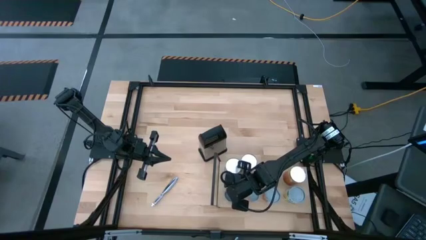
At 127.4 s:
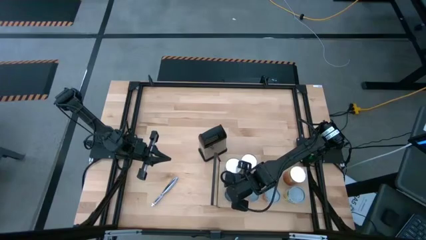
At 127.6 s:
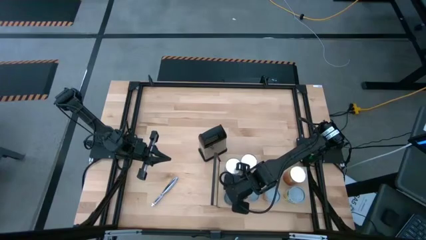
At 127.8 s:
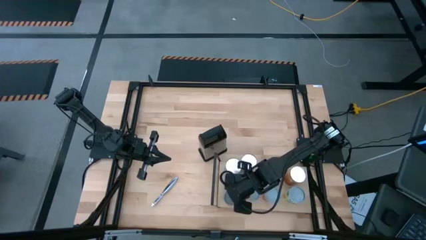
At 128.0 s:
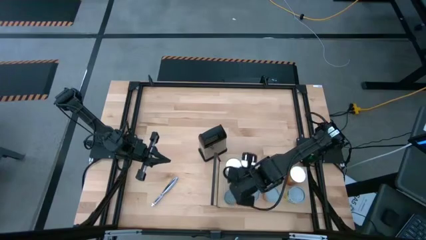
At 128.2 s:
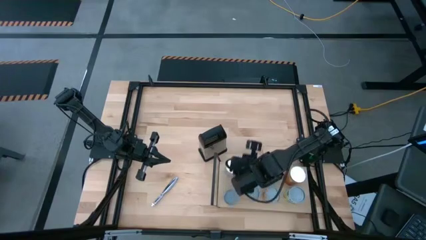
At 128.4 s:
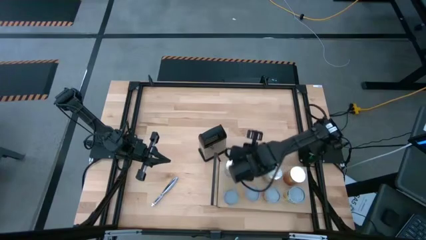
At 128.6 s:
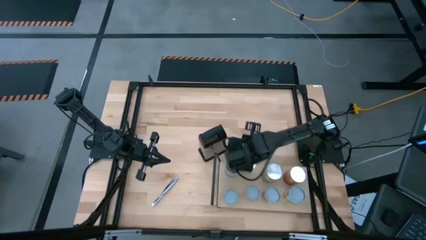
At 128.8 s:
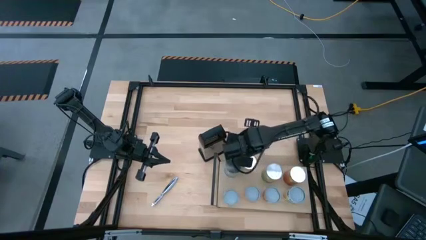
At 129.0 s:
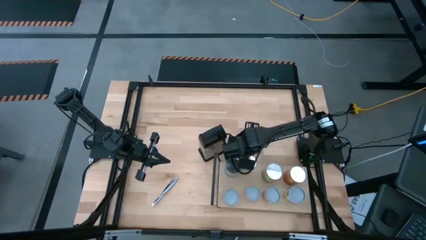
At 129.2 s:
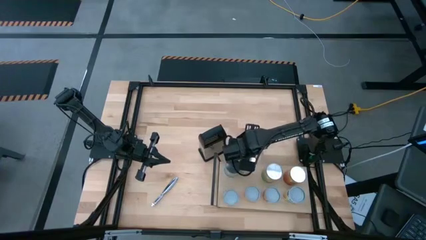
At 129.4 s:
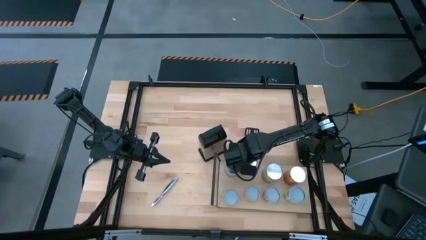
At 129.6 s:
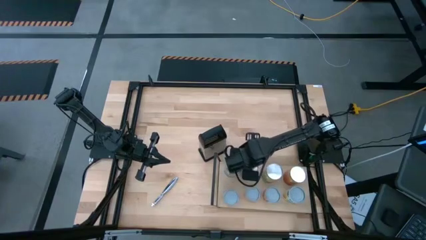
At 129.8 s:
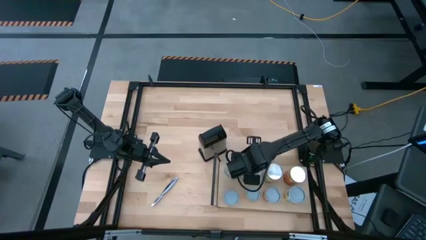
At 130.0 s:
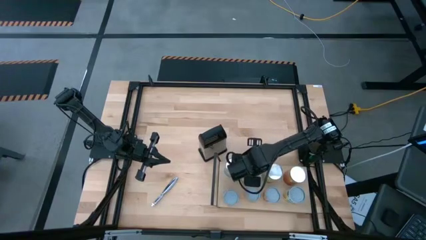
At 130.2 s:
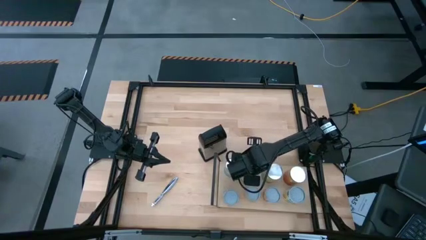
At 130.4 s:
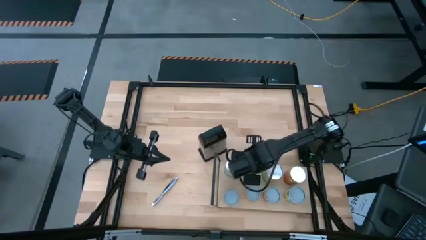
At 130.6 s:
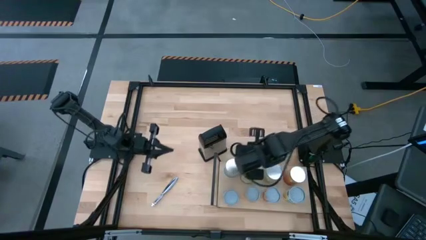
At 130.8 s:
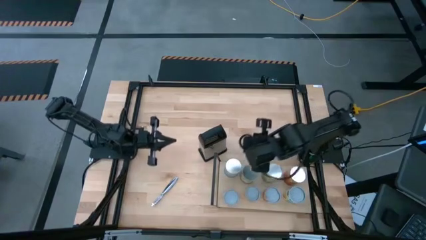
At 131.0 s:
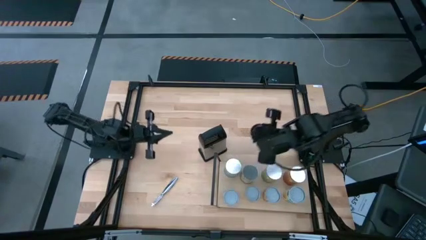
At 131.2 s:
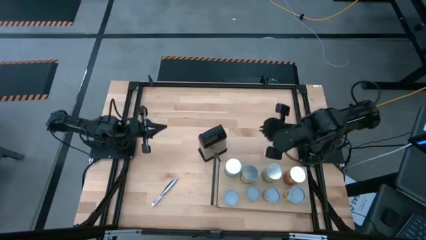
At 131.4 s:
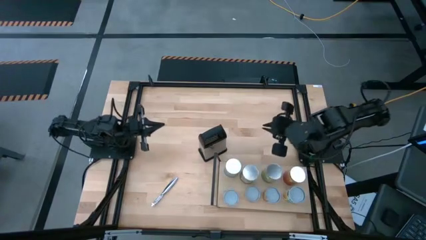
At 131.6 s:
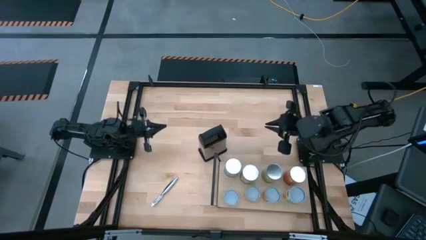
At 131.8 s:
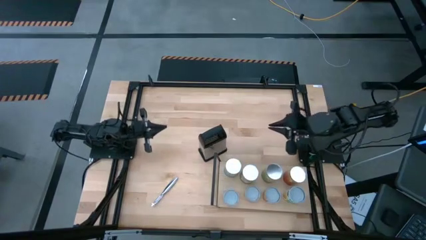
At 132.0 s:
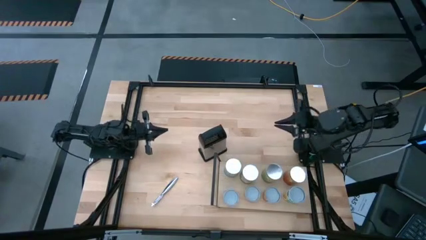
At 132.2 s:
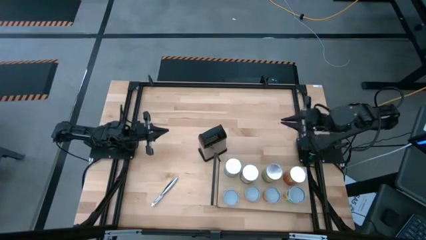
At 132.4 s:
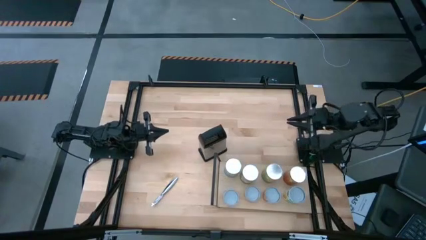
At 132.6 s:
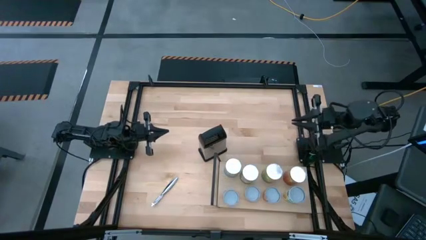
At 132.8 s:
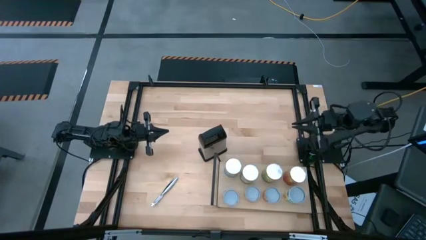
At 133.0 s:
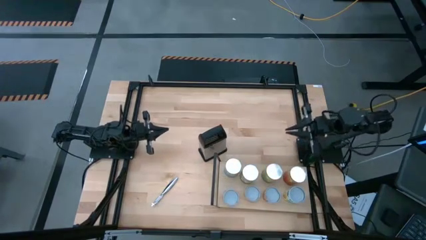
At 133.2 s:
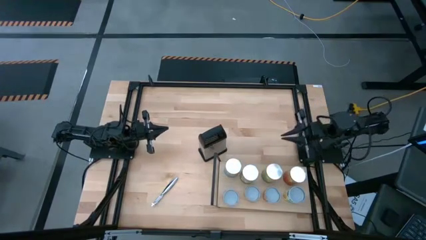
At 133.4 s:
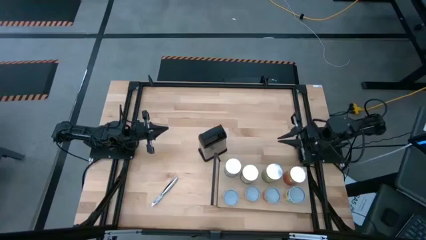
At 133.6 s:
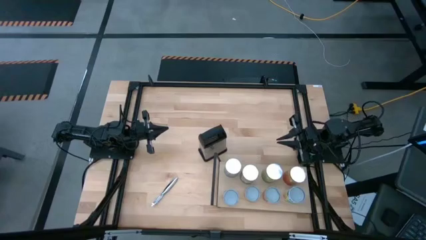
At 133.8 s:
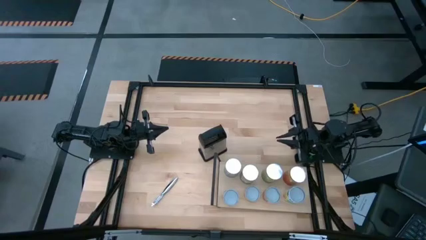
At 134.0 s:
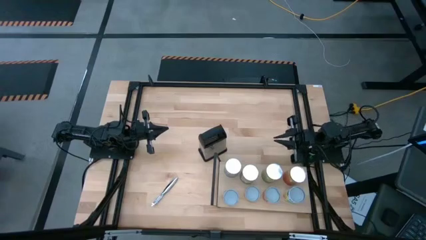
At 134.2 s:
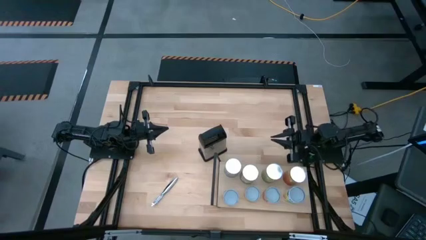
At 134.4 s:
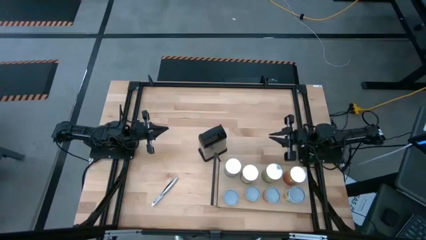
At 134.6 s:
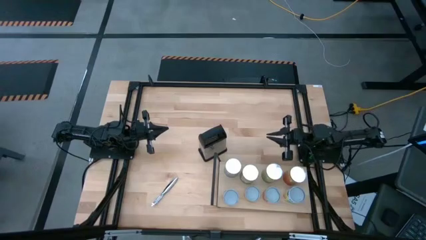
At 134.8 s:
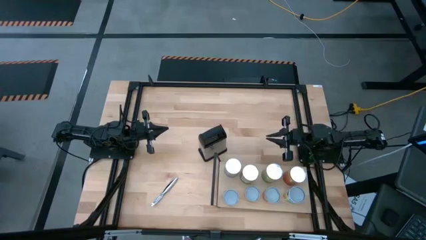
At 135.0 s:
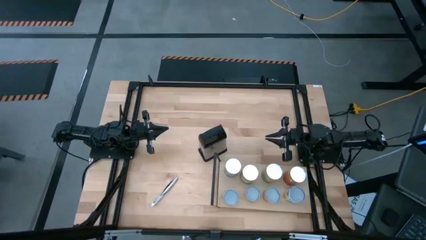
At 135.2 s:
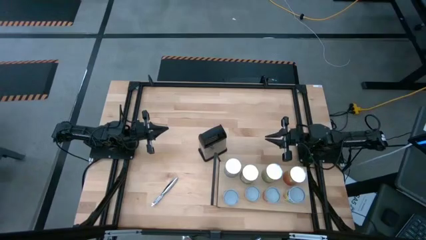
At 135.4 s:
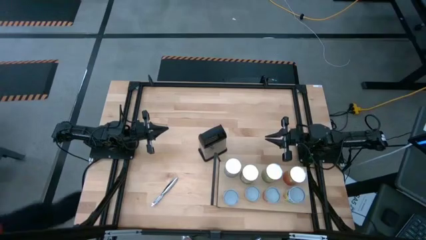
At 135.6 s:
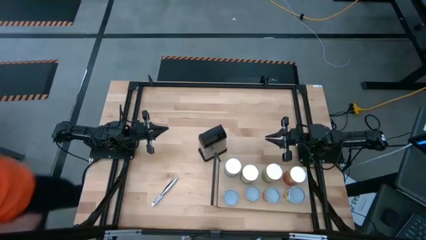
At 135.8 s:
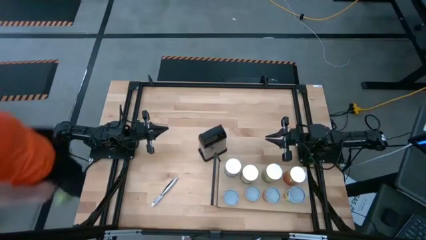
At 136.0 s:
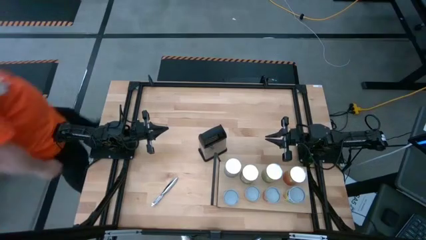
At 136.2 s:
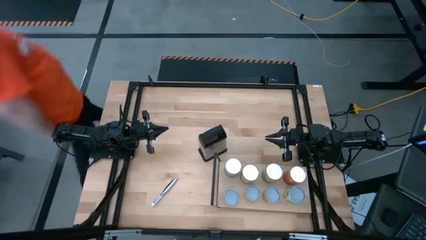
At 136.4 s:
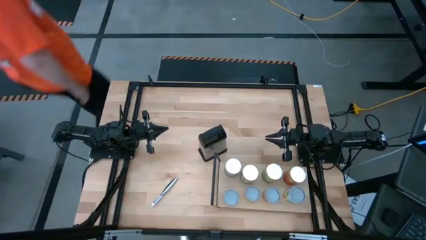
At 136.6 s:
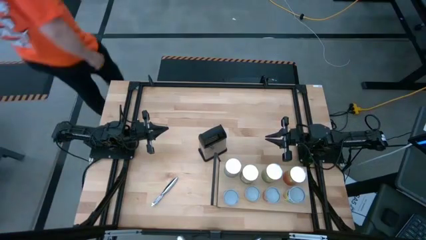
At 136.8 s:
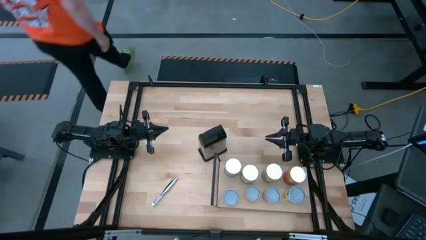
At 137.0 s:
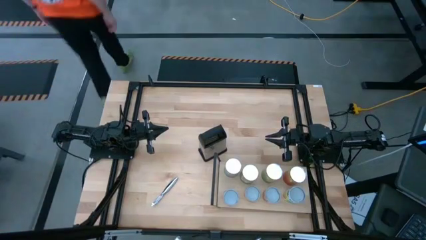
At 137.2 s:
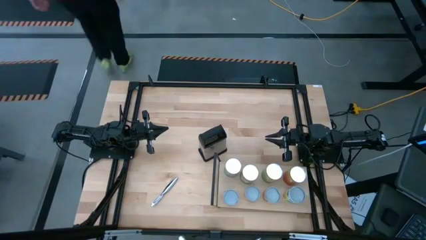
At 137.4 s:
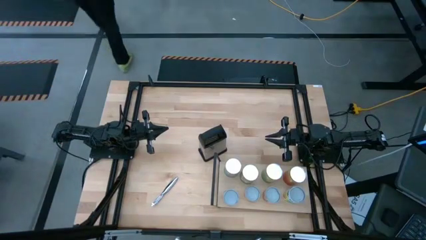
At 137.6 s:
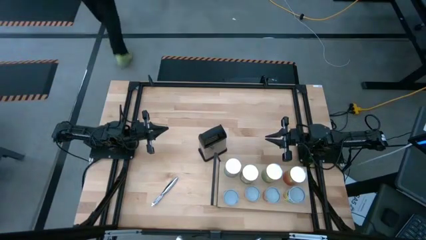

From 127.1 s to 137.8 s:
Task: Pick and place cans onto a shelf
Return to Home Position

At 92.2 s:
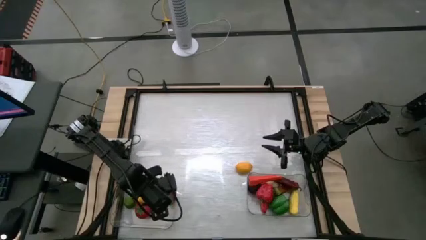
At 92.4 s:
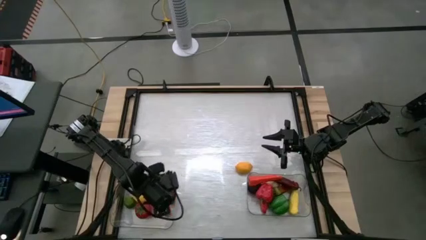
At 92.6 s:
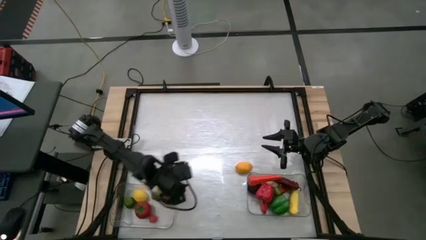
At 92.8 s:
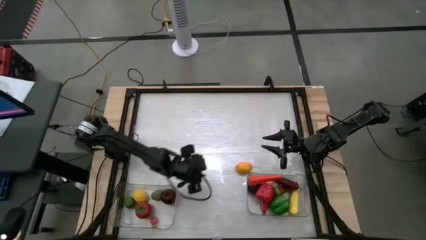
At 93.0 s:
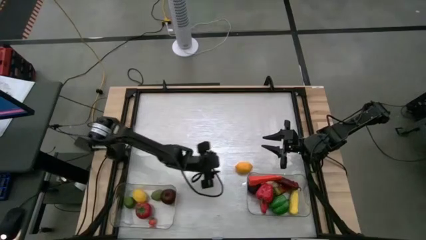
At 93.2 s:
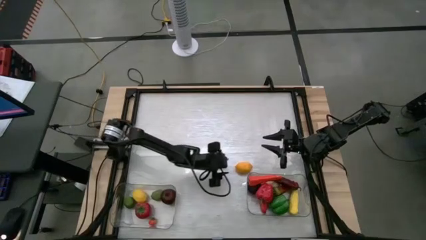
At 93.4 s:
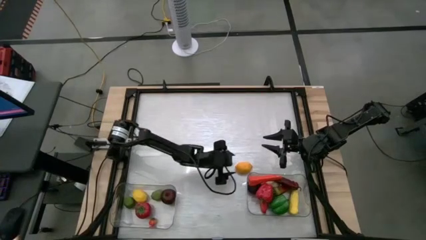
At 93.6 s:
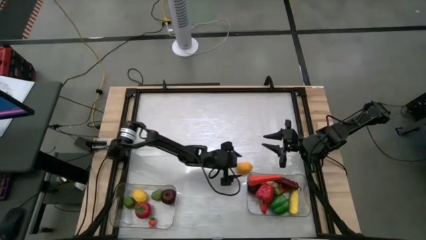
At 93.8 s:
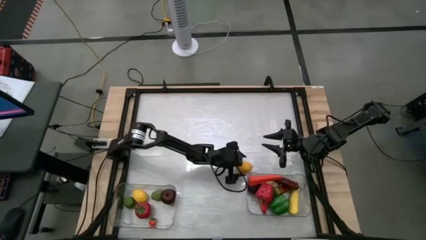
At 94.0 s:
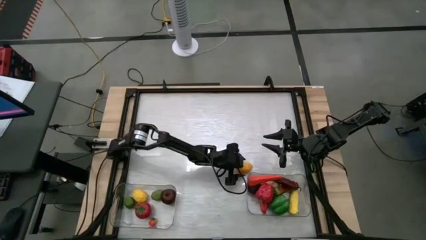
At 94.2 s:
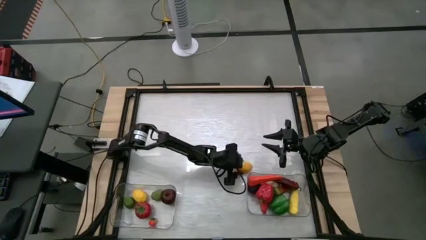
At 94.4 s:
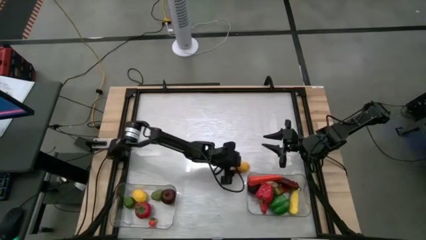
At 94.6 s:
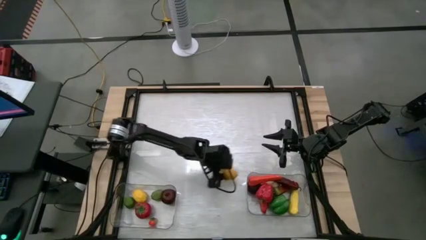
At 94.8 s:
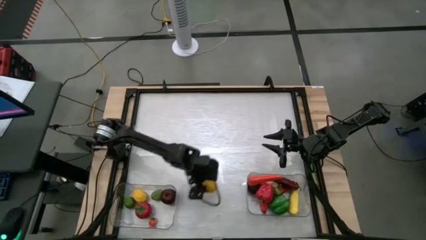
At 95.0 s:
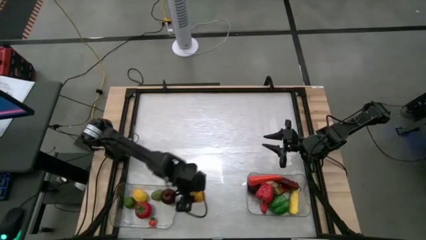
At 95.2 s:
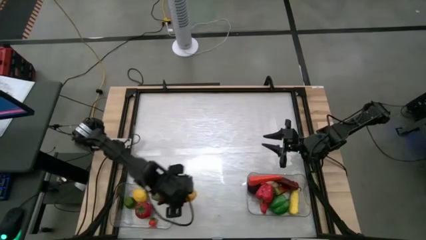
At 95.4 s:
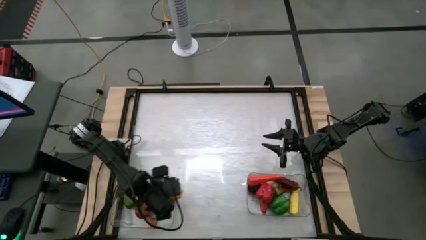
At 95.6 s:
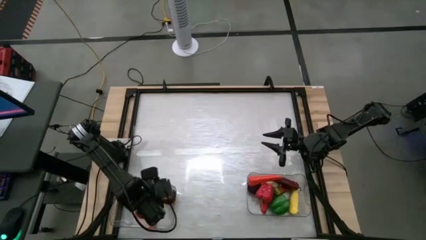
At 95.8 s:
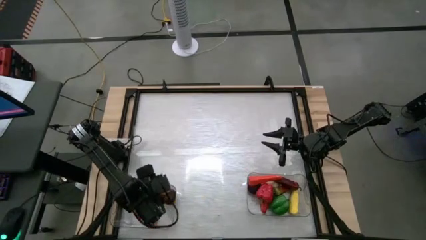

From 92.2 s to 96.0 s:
Task: Sort produce into baskets
Put the lemon into the left transparent bin
